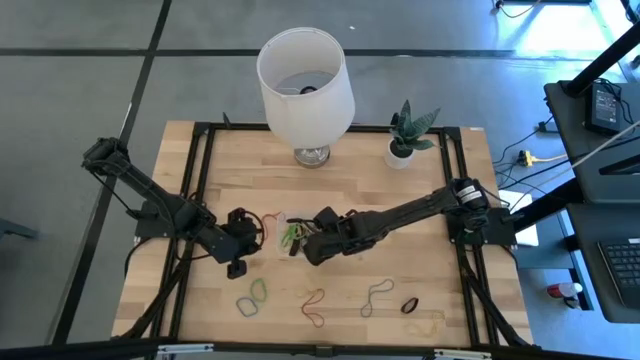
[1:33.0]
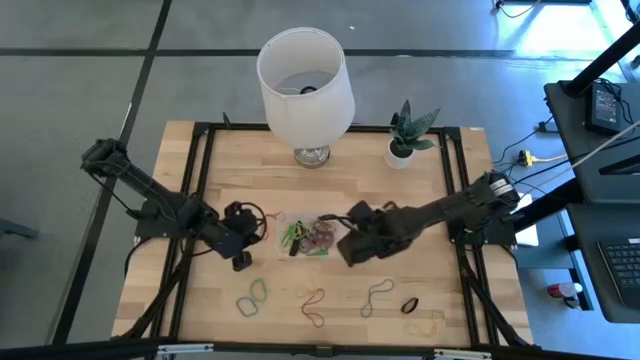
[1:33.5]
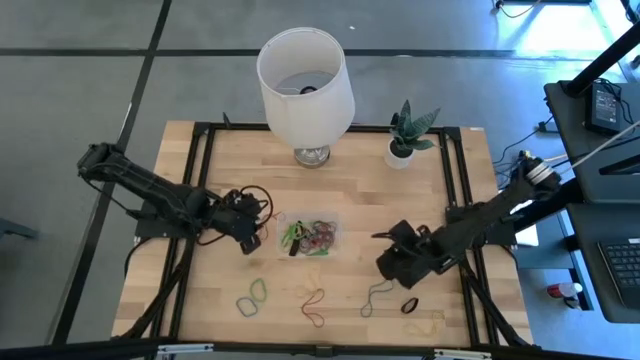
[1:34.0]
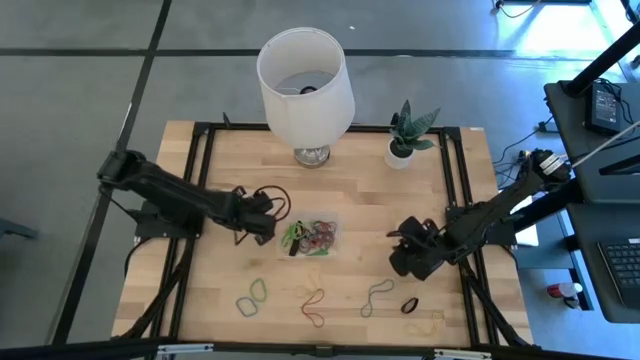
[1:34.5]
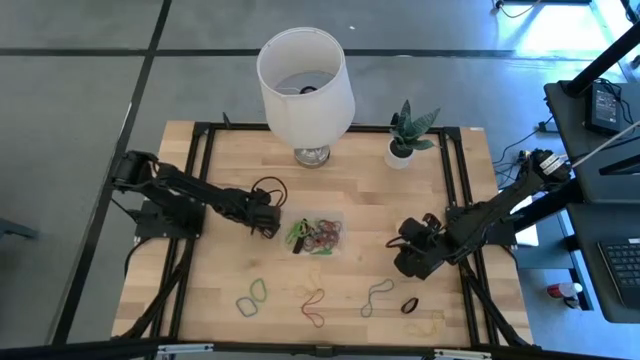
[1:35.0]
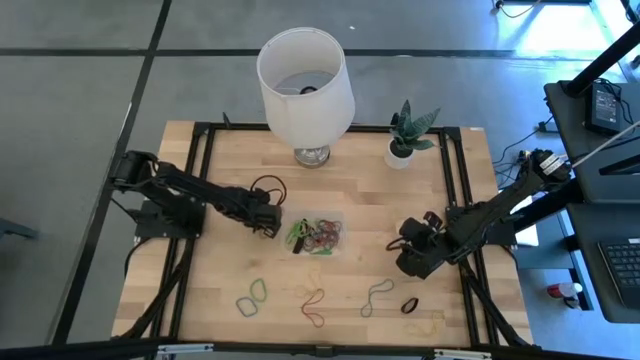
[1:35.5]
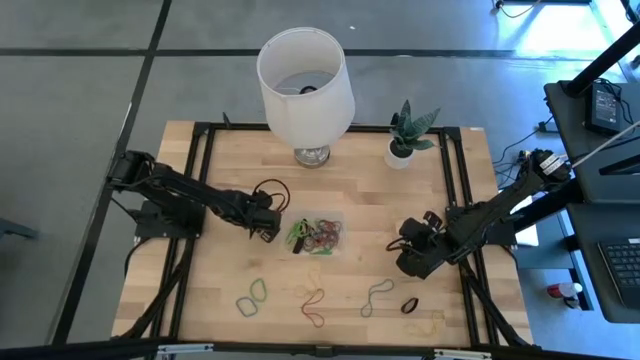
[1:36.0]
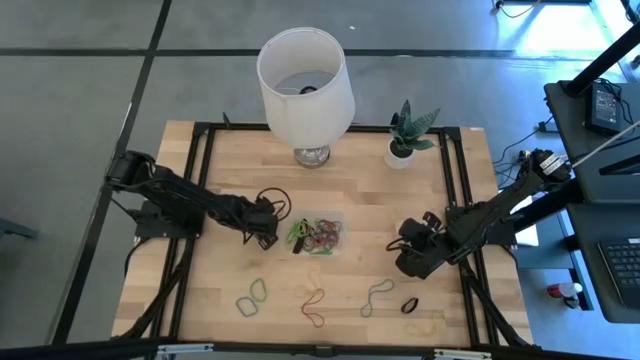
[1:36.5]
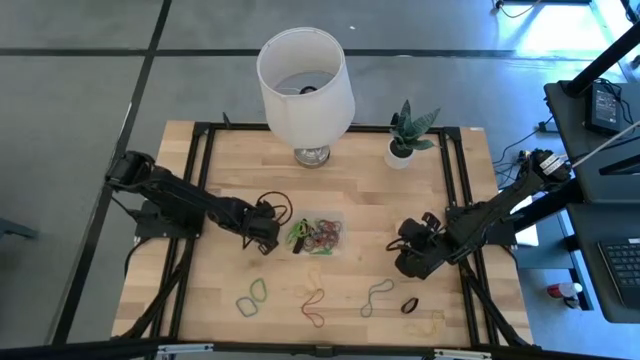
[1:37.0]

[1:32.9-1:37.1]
Task: Pick and place rubber bands into bin
Put the left red rubber band into the transparent bin

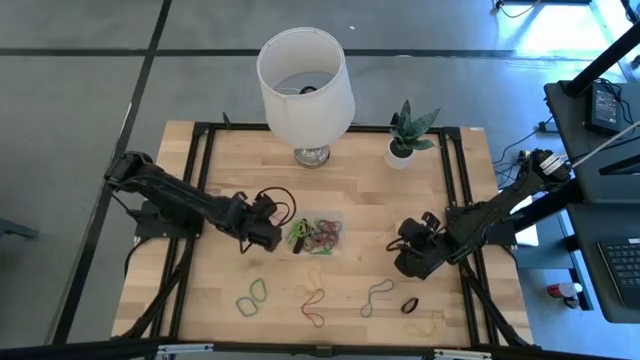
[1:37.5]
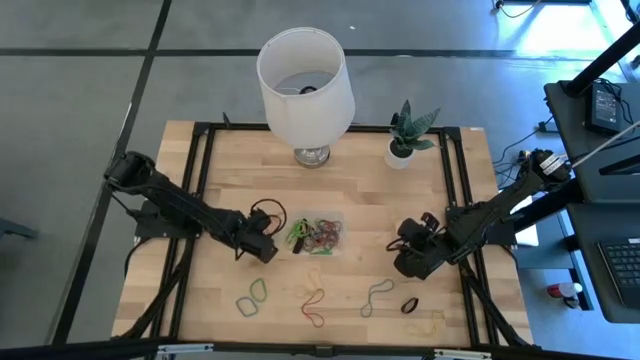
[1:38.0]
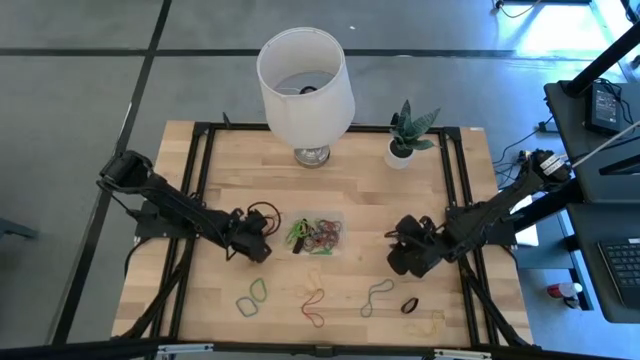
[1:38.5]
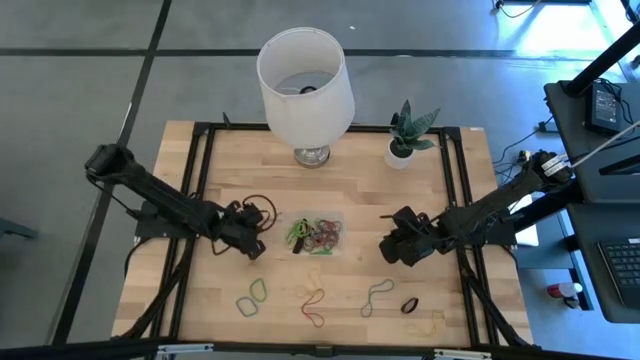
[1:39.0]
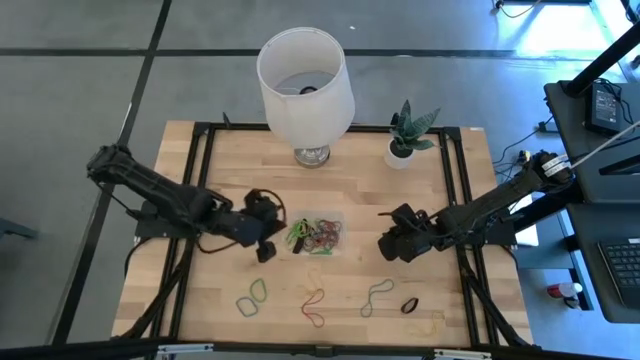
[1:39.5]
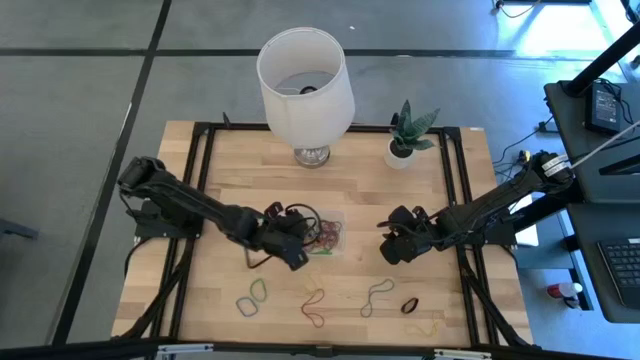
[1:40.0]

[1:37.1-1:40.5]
Put the left red rubber band into the transparent bin

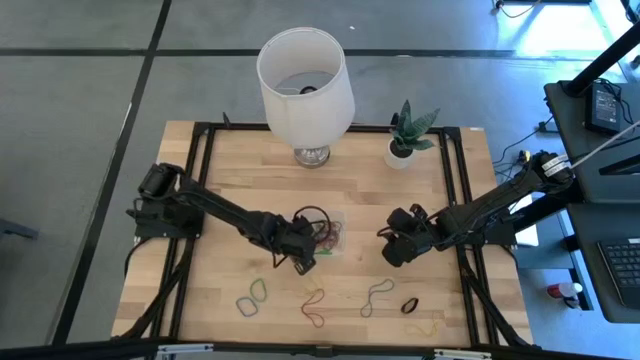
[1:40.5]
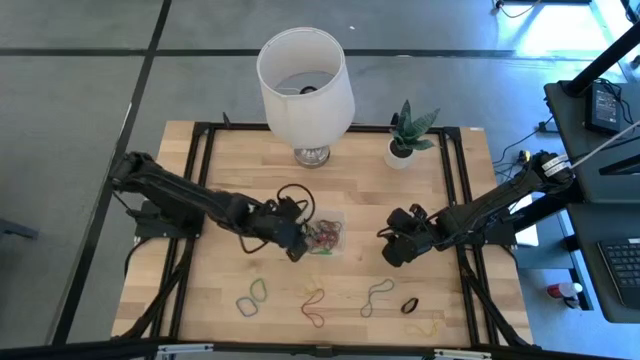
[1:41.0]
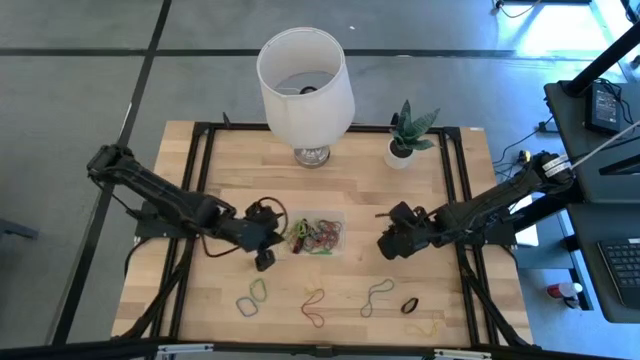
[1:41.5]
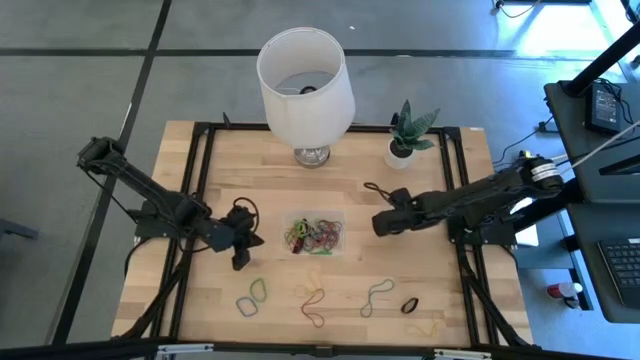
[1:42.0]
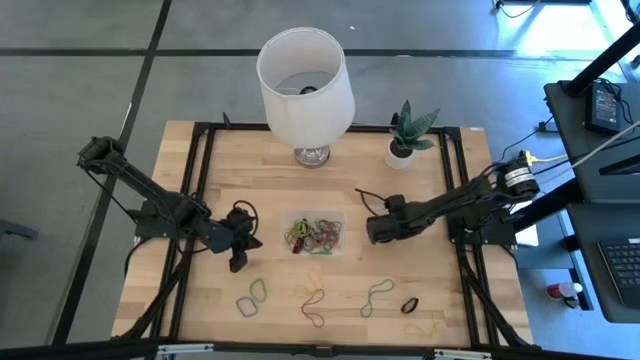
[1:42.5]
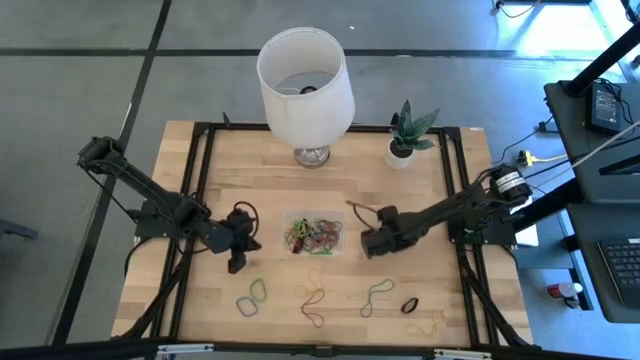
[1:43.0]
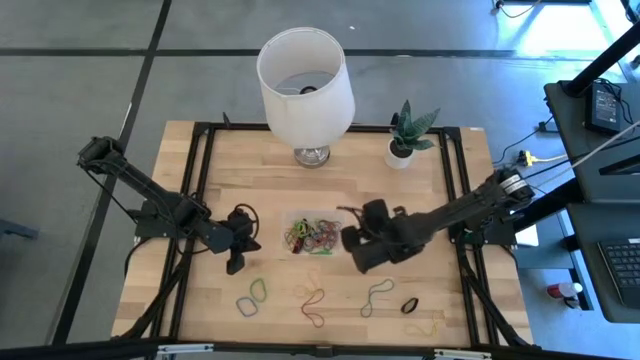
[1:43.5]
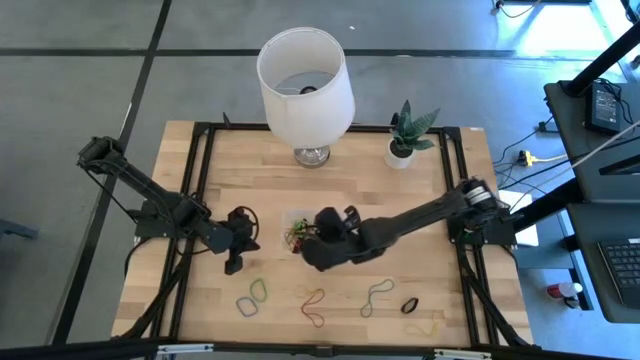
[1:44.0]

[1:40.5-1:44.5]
Put the right yellow rubber band into the transparent bin

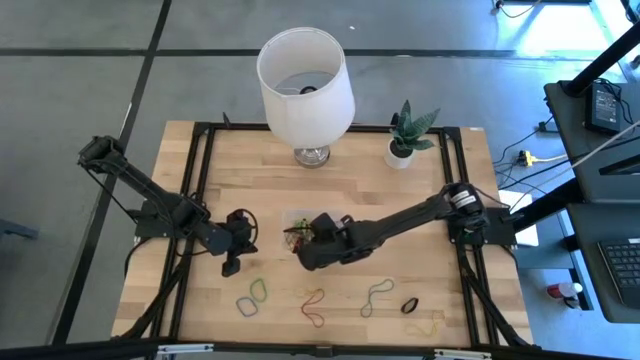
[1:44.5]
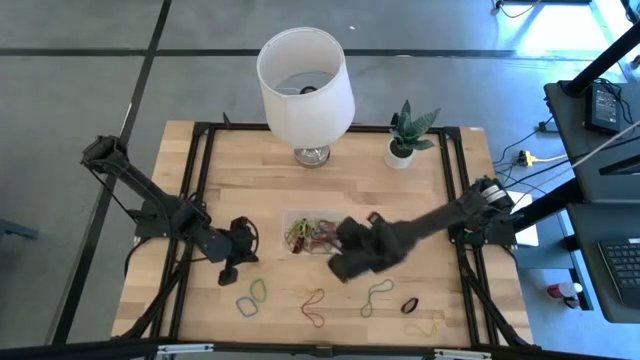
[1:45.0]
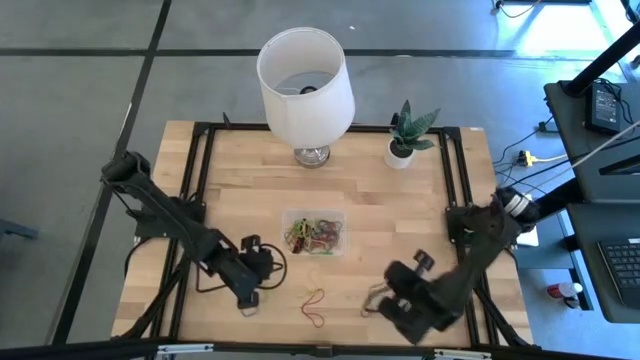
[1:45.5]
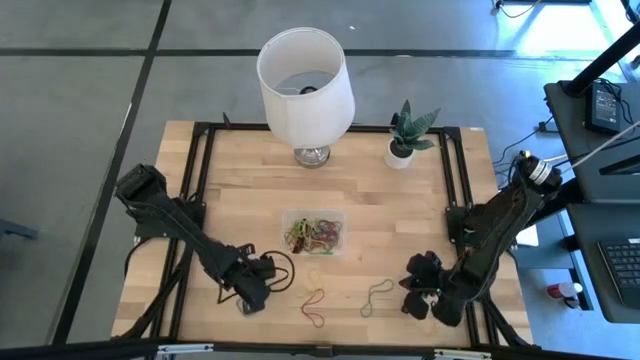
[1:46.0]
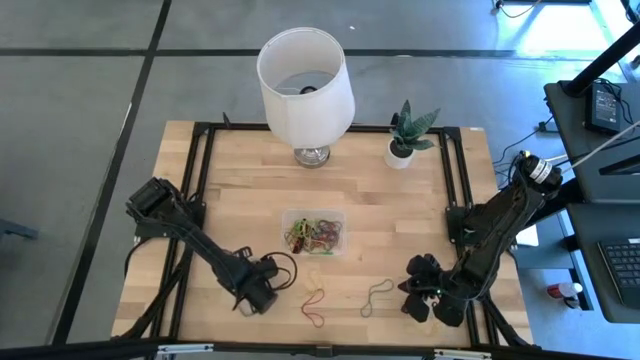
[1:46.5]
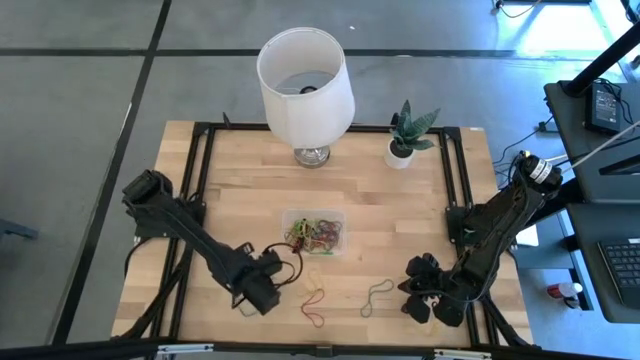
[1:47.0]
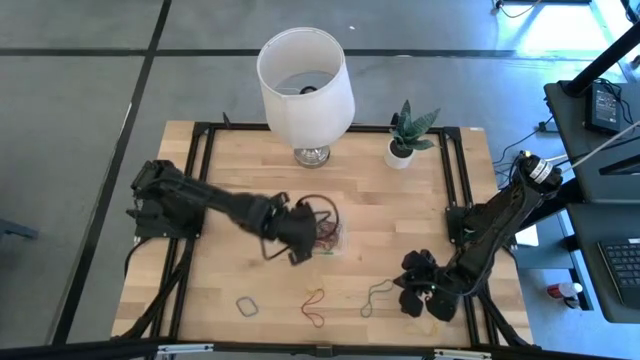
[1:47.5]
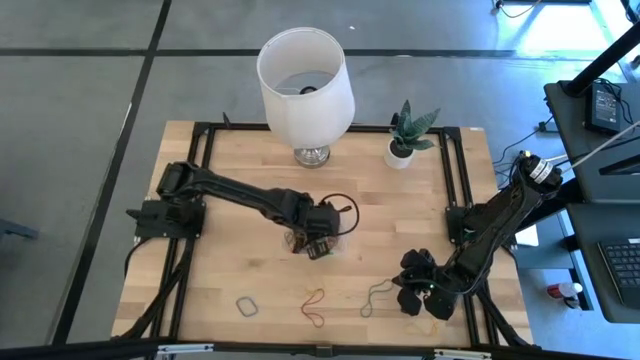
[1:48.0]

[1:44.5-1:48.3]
Put the green rubber band into the transparent bin

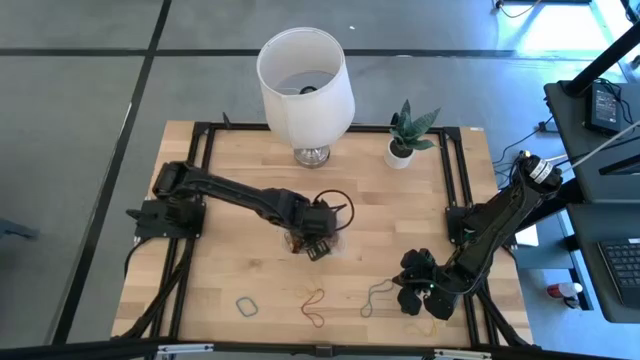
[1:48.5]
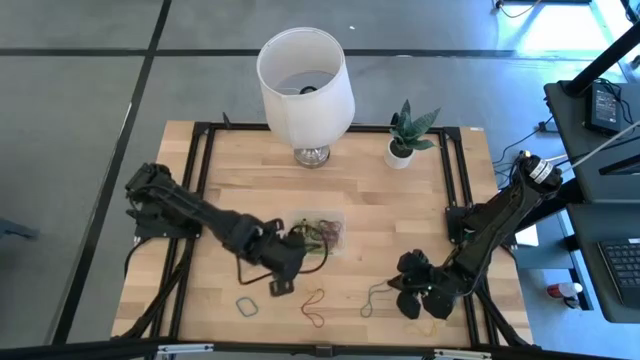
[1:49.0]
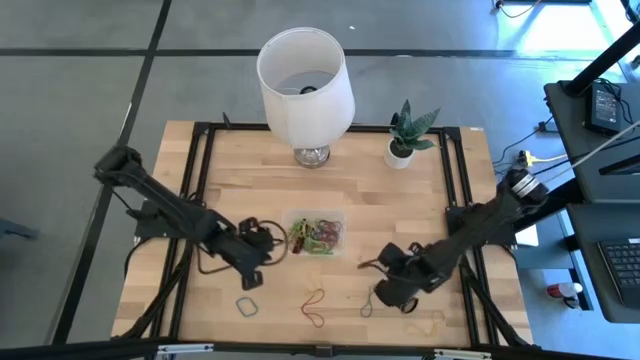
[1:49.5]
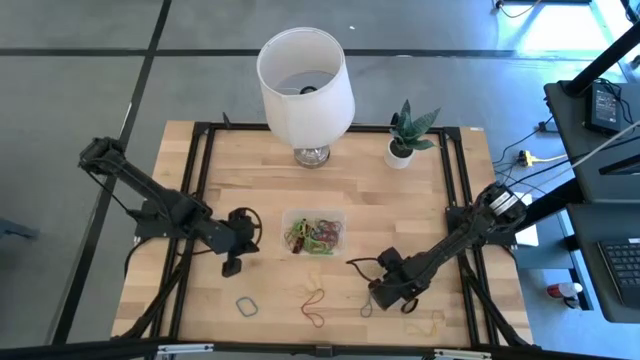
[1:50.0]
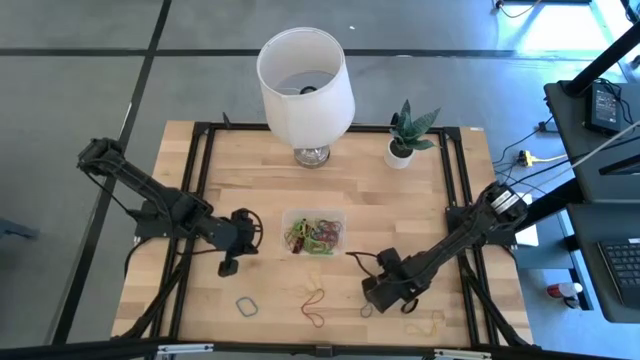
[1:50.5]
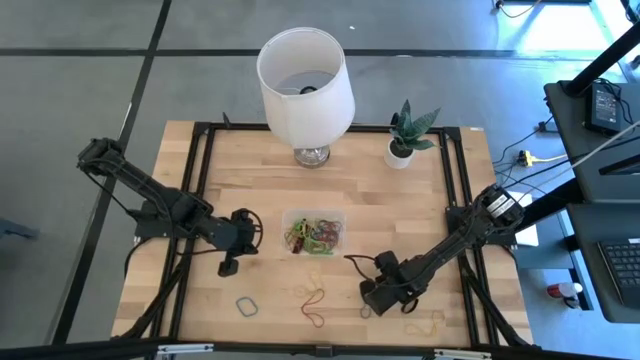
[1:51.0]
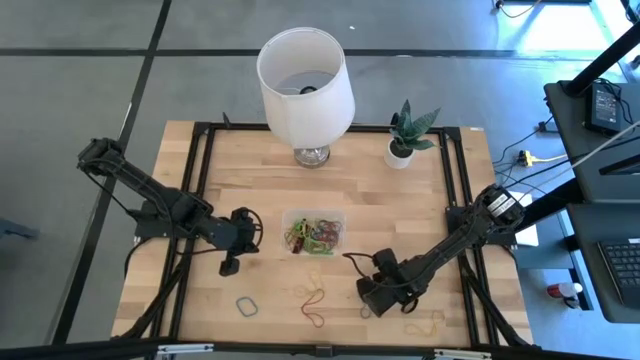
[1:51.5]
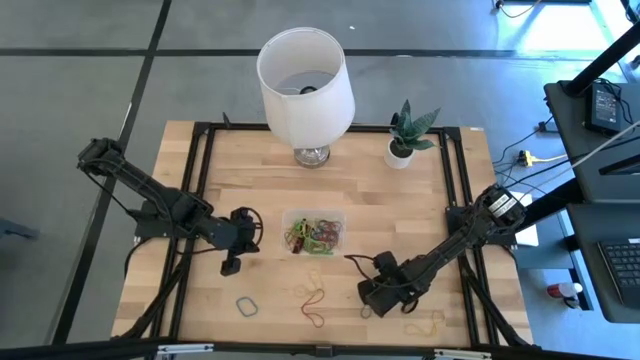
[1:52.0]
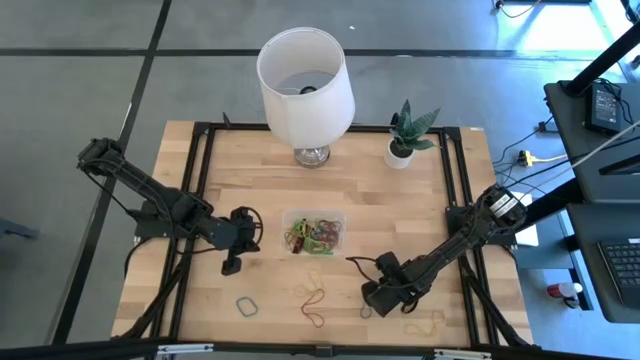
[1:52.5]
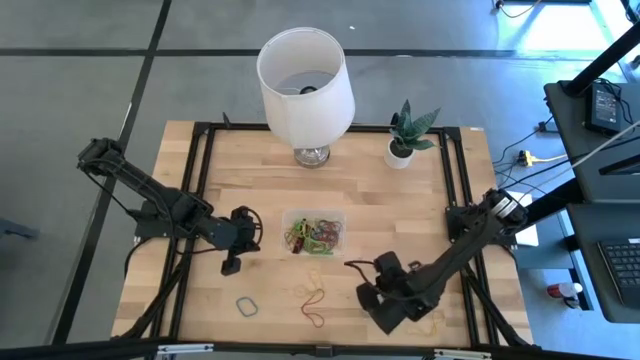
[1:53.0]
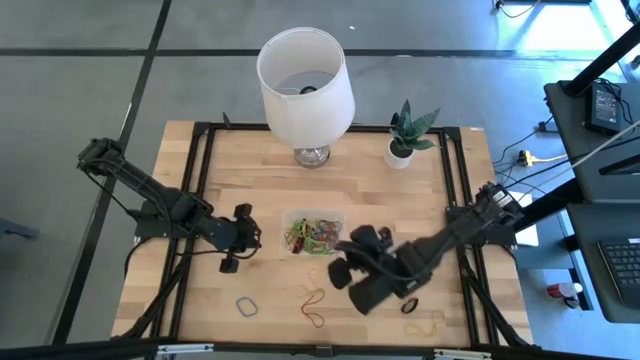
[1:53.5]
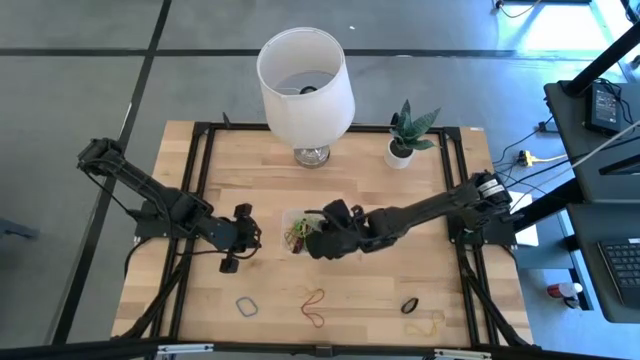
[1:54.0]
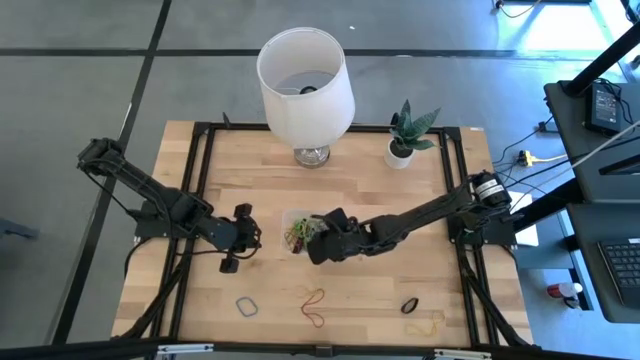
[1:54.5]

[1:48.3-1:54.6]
Put the right blue rubber band into the transparent bin
